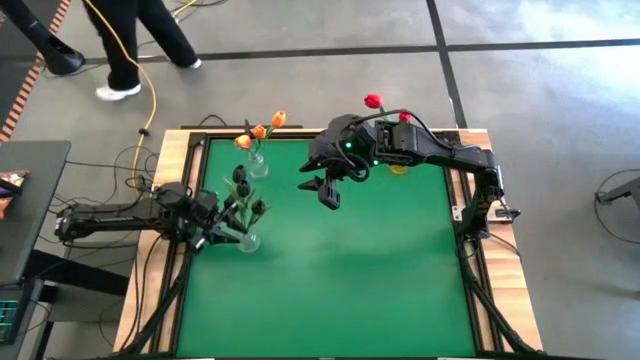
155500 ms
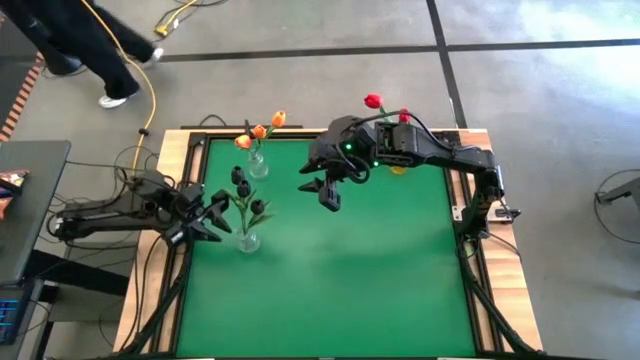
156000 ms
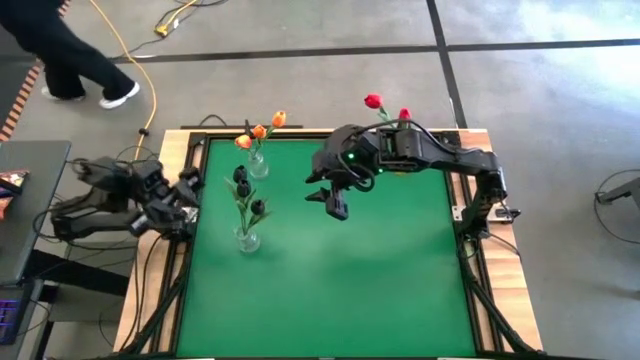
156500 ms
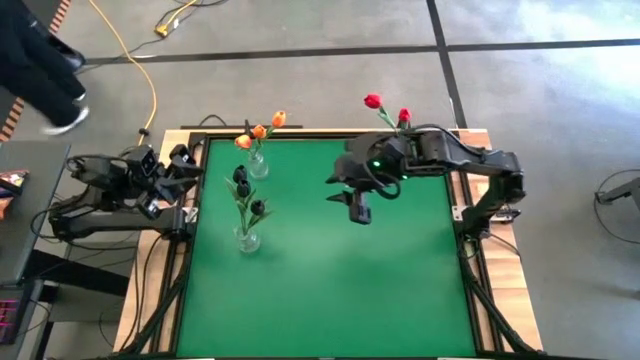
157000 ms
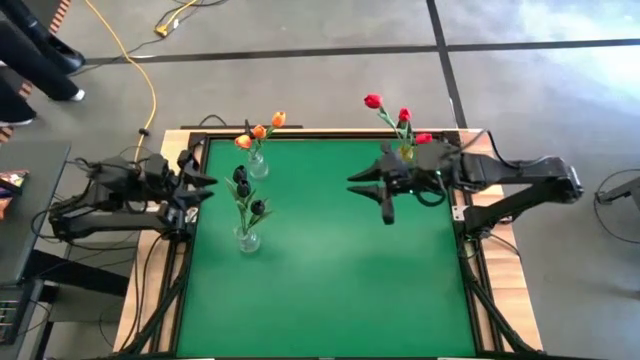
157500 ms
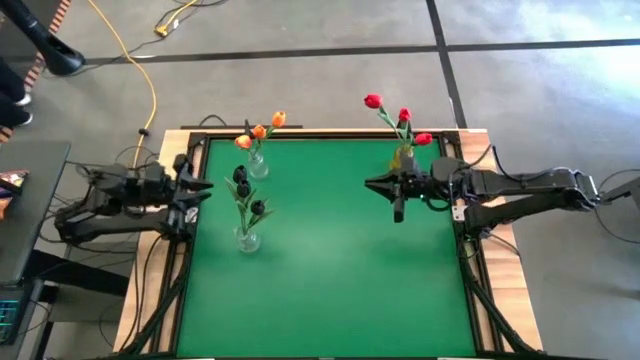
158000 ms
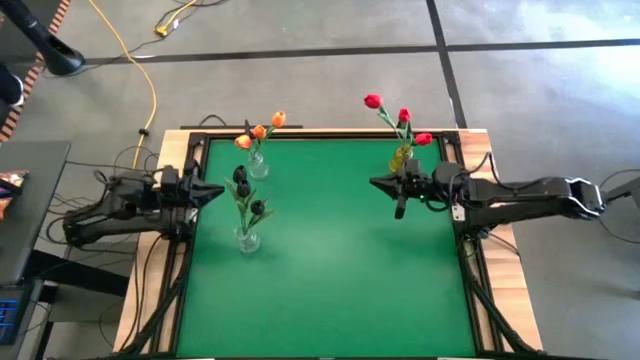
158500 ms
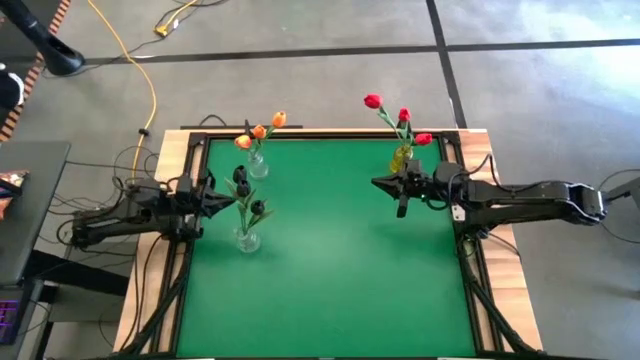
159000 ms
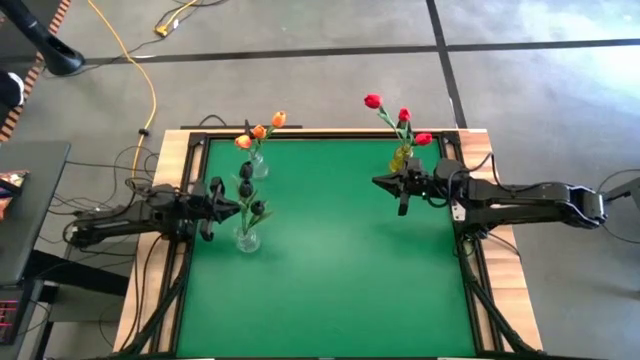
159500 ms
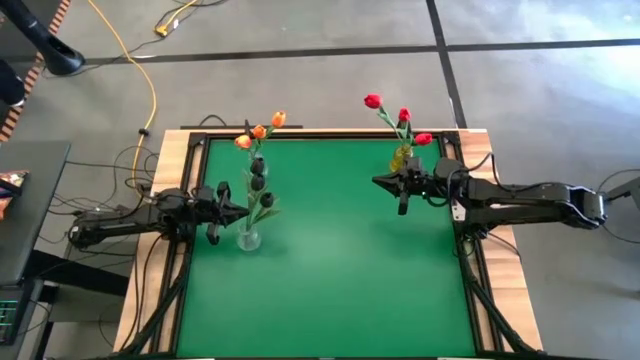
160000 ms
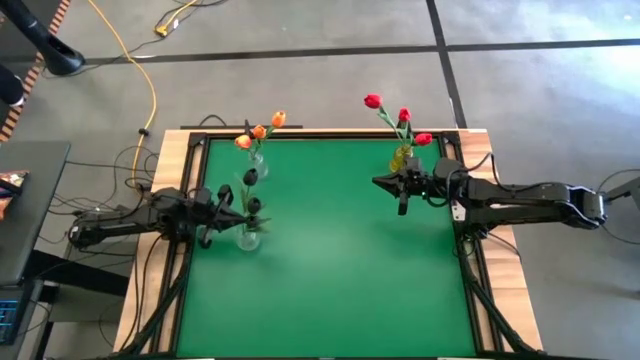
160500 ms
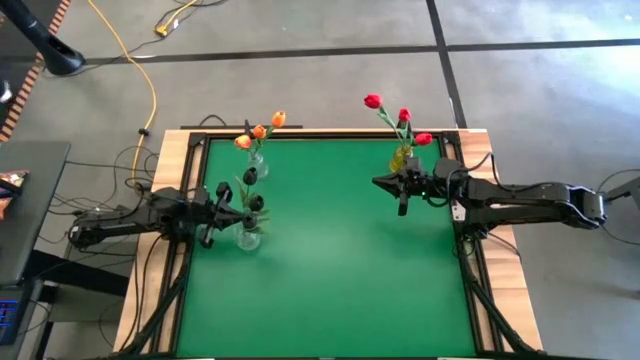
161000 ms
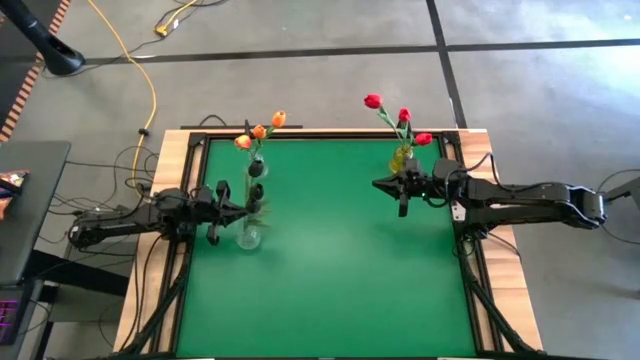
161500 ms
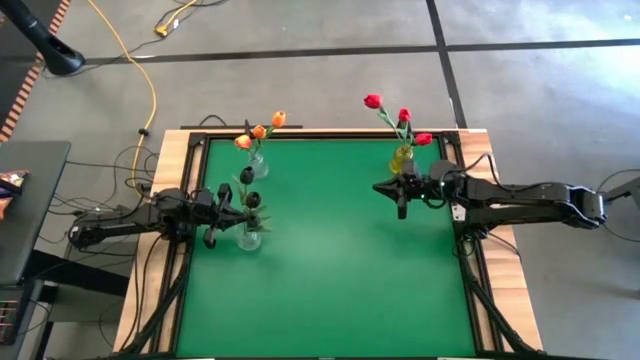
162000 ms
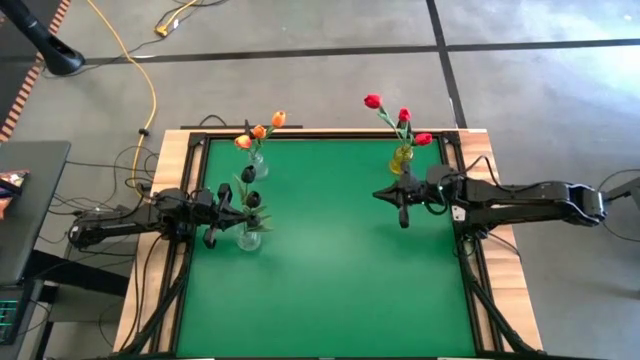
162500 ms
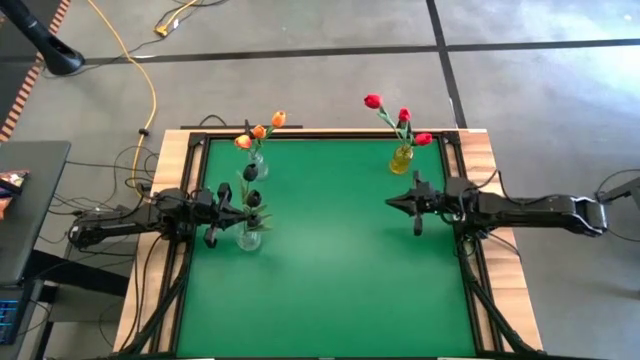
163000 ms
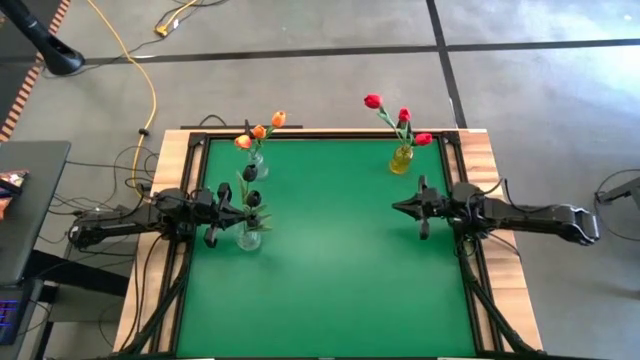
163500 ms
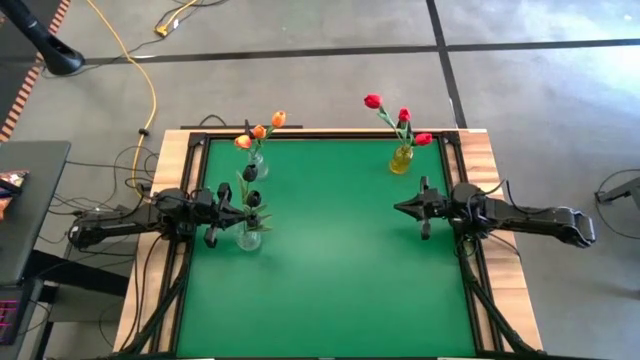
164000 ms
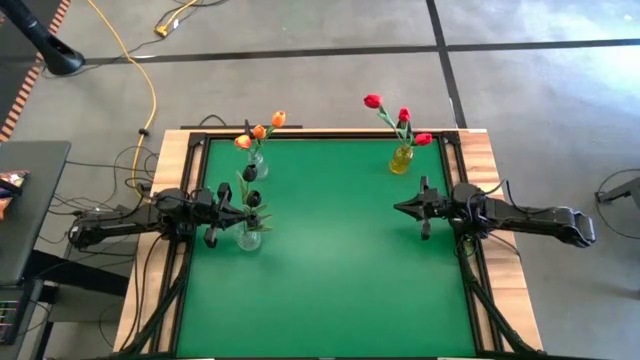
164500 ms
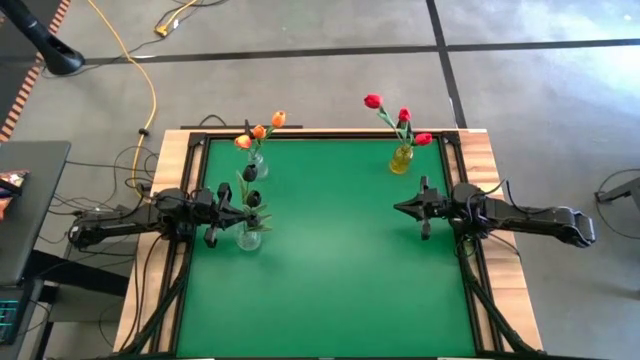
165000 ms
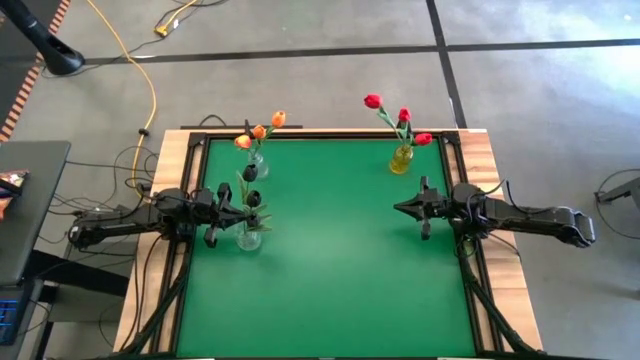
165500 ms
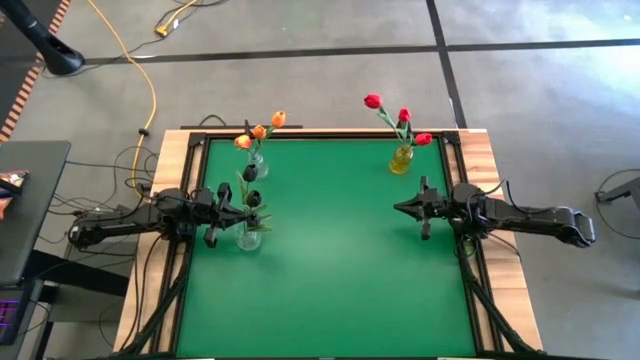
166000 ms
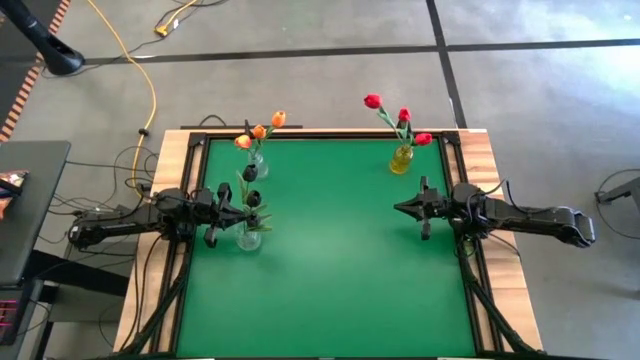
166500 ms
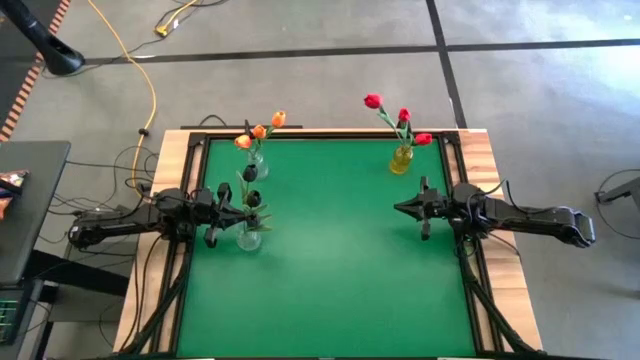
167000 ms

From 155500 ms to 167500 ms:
Task: Sort flowers into vase by color
Return to Home Position

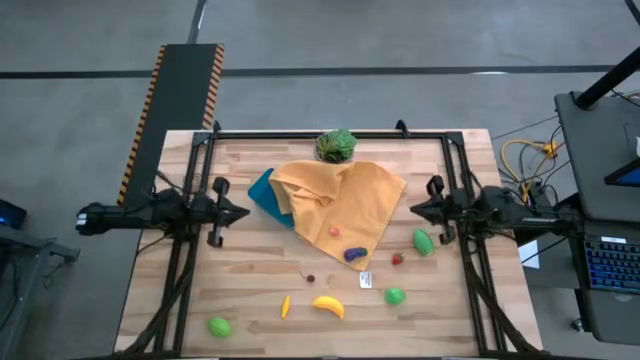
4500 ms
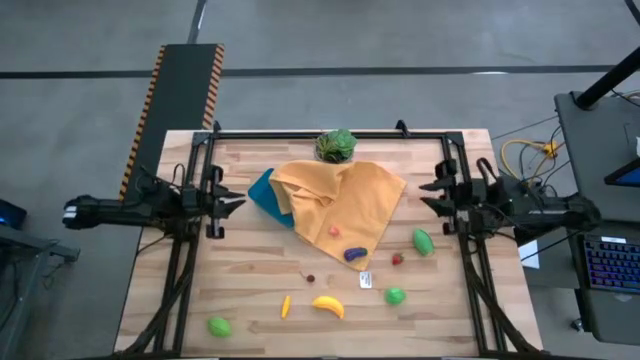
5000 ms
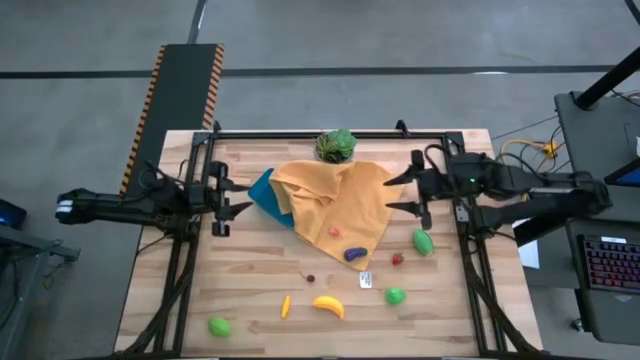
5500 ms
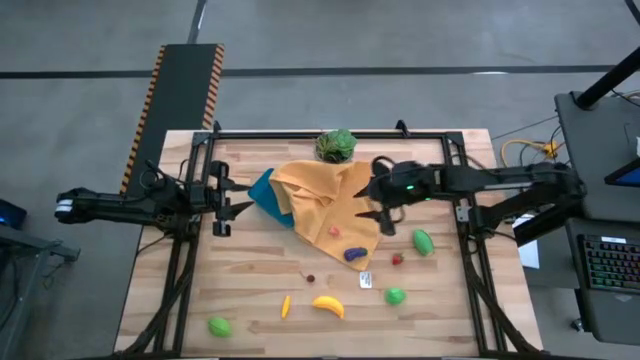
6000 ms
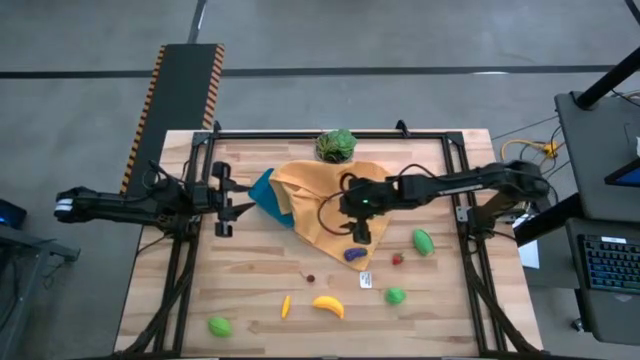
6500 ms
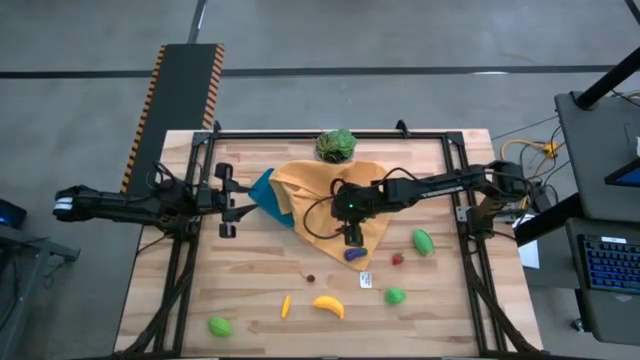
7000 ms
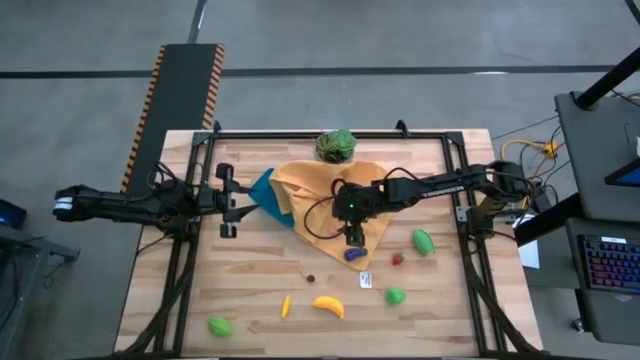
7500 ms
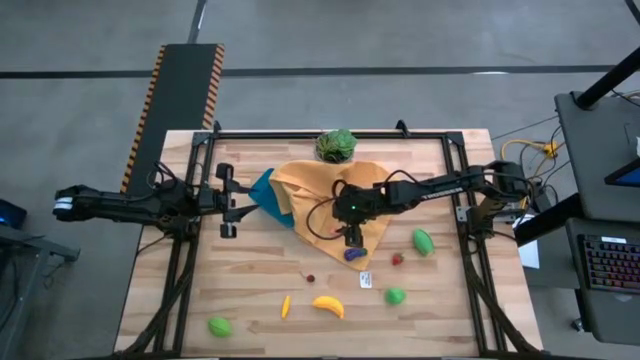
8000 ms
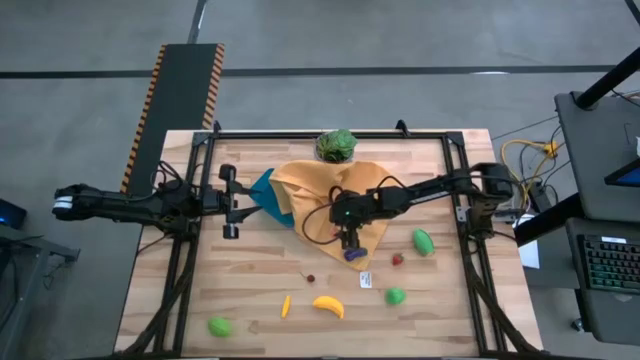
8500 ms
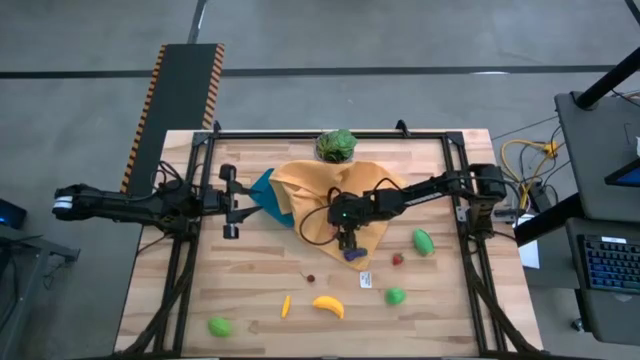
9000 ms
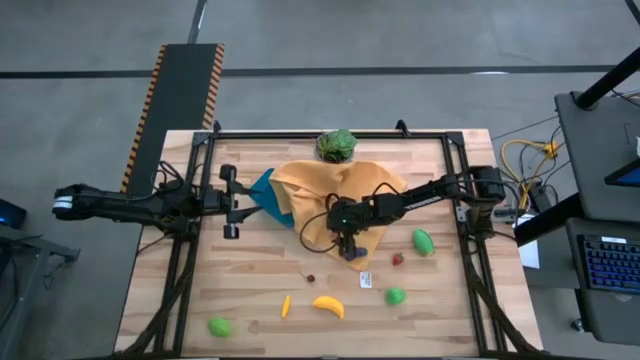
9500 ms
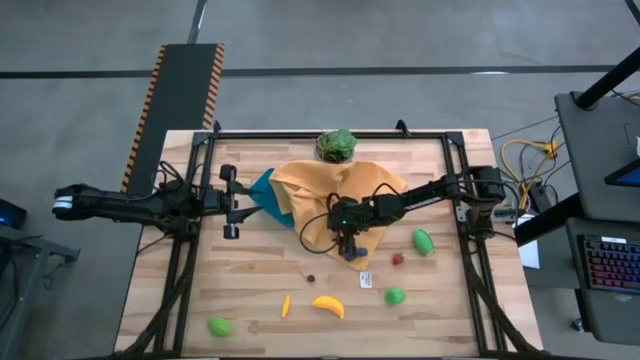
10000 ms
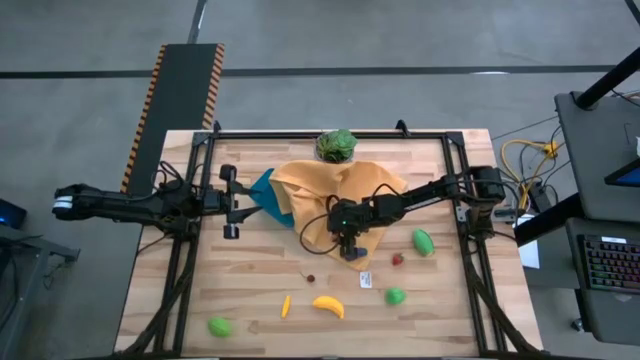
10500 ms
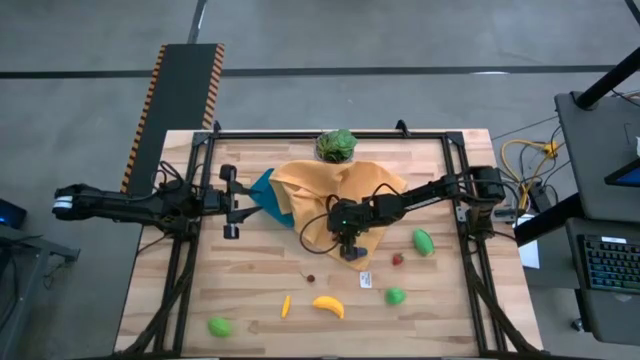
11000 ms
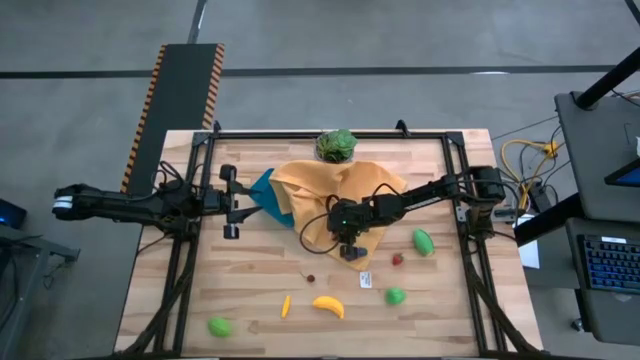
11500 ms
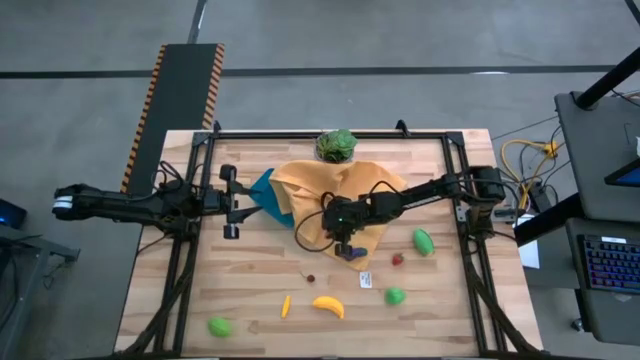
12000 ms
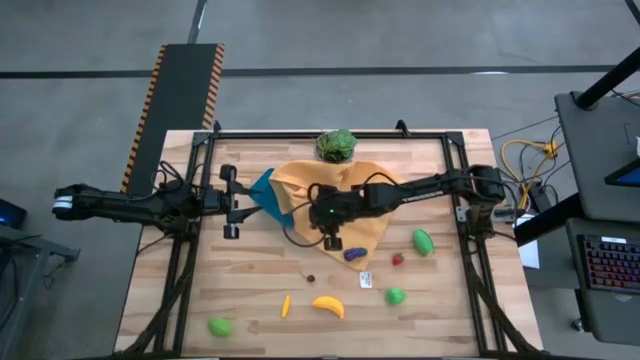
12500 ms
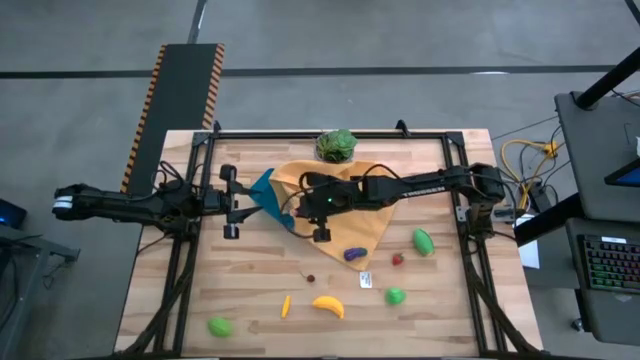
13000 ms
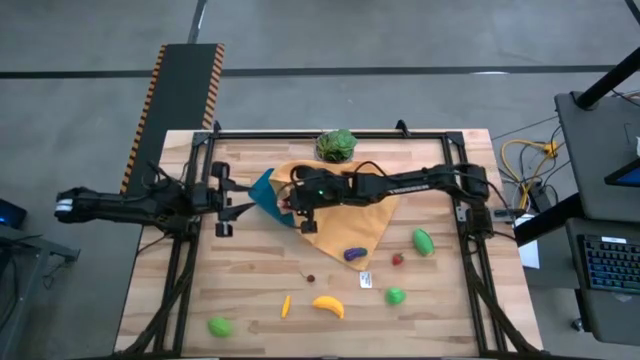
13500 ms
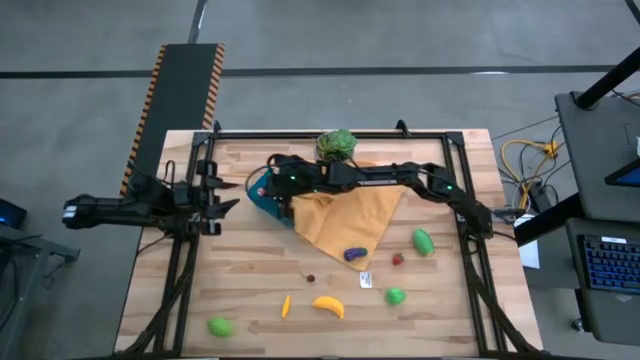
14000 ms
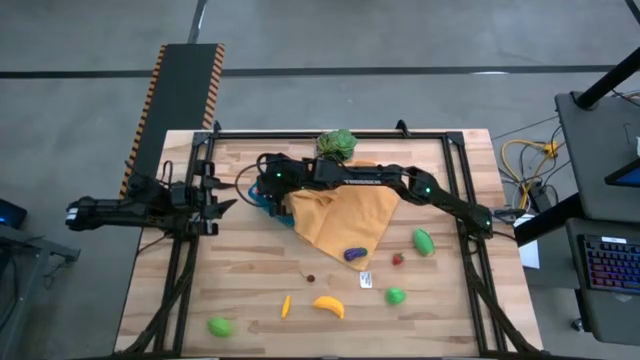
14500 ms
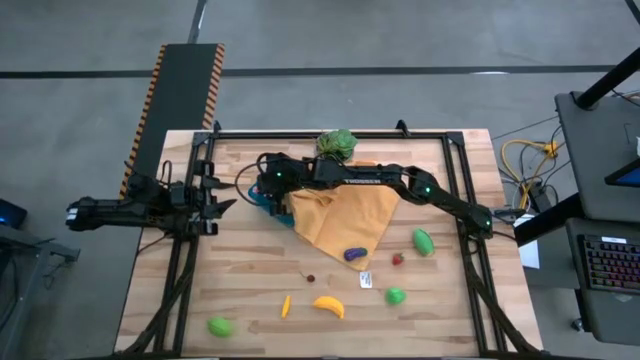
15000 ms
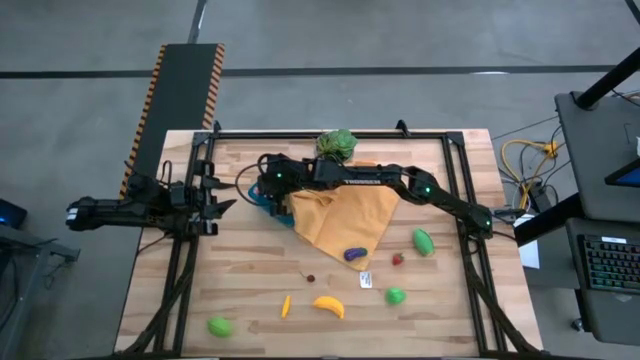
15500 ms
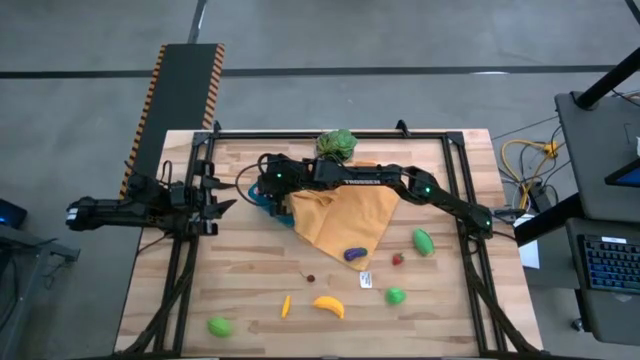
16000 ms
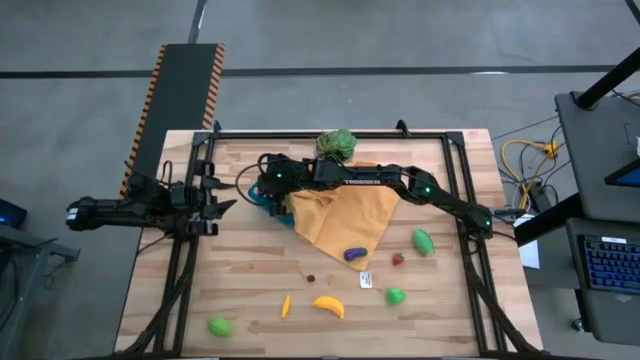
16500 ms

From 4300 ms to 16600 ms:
Task: Pick and placing Produce into tupperware
Put the pink peach into the blue bin
